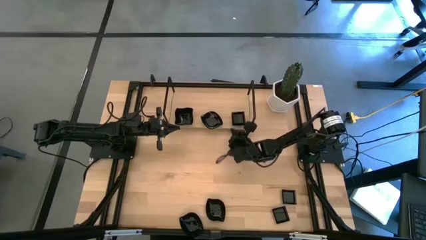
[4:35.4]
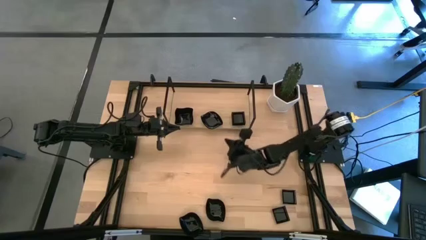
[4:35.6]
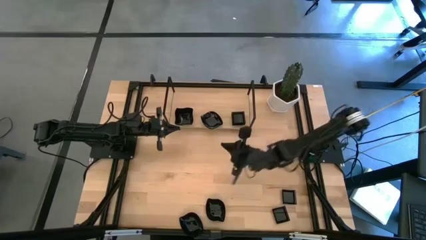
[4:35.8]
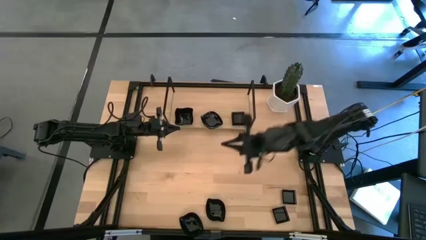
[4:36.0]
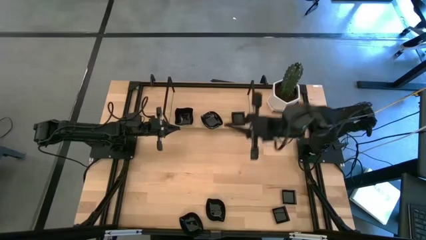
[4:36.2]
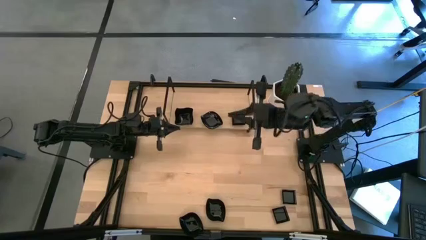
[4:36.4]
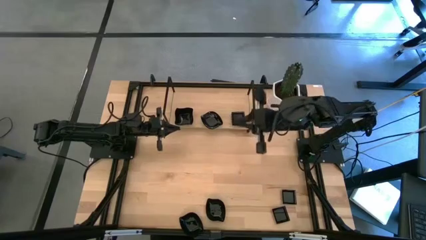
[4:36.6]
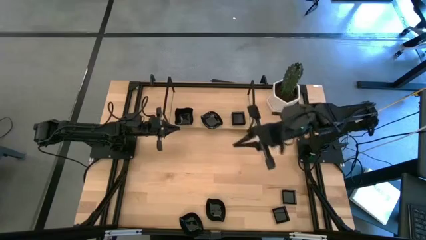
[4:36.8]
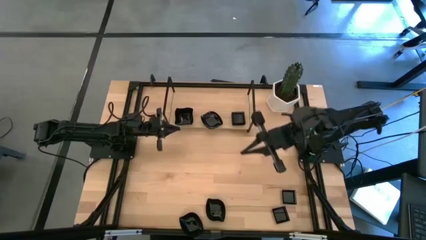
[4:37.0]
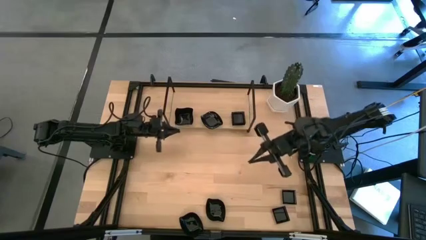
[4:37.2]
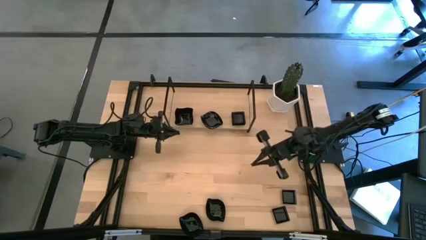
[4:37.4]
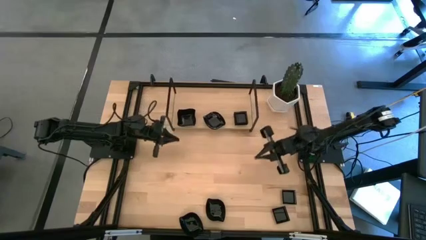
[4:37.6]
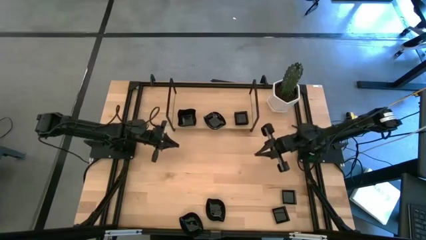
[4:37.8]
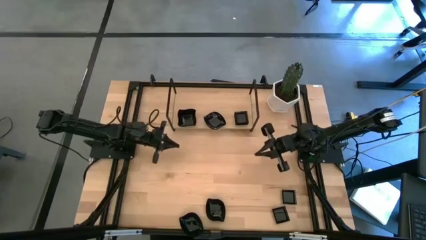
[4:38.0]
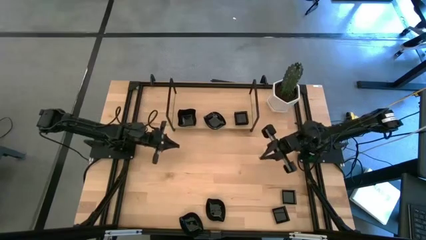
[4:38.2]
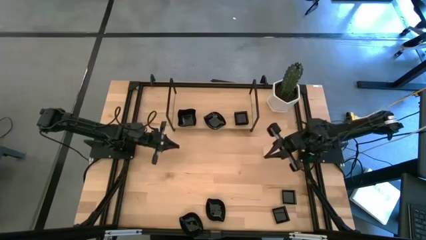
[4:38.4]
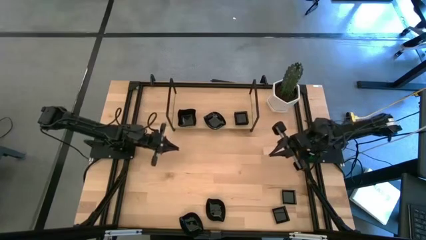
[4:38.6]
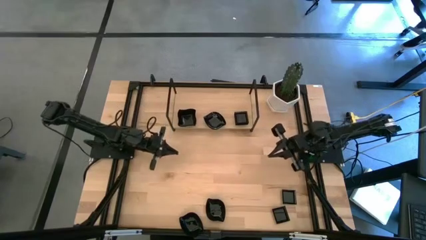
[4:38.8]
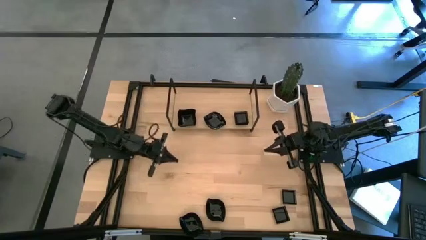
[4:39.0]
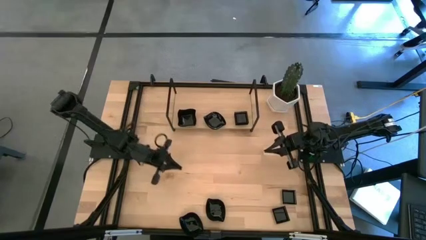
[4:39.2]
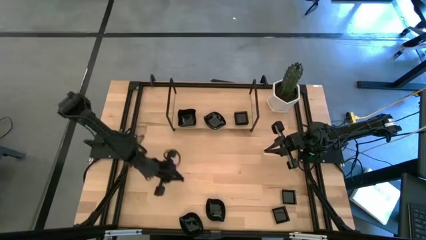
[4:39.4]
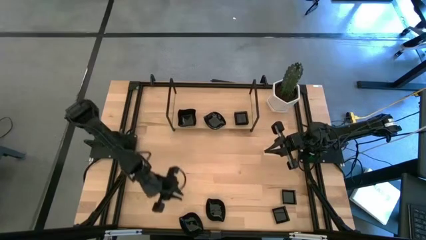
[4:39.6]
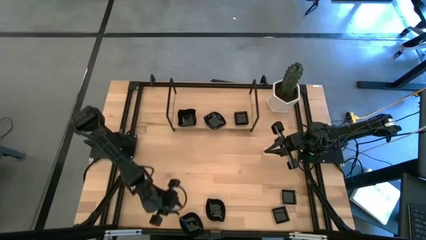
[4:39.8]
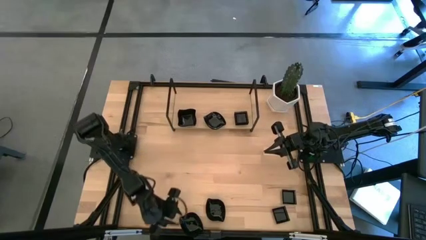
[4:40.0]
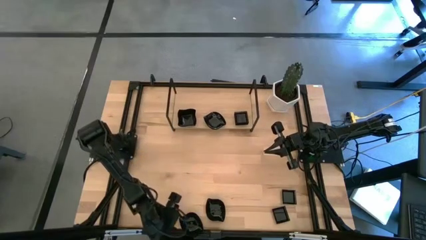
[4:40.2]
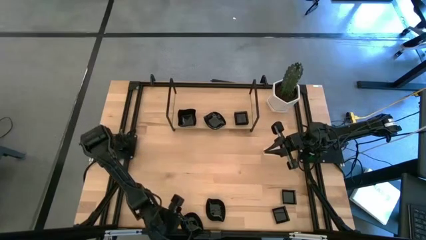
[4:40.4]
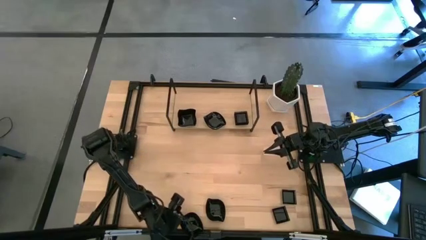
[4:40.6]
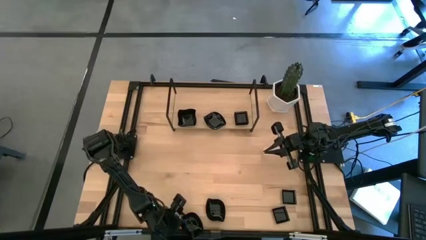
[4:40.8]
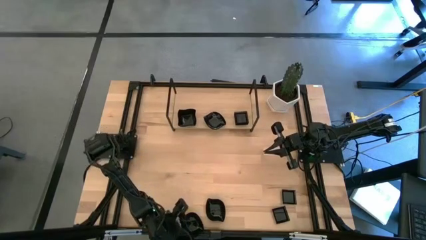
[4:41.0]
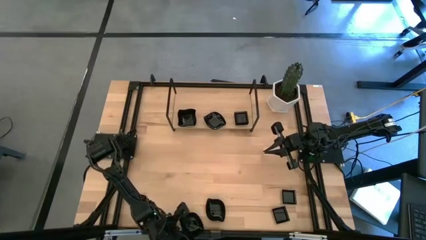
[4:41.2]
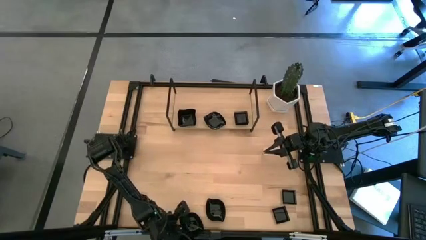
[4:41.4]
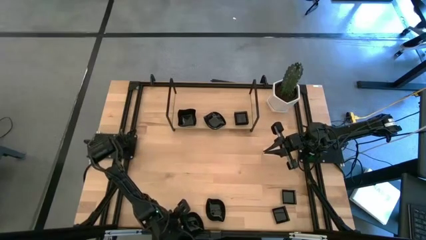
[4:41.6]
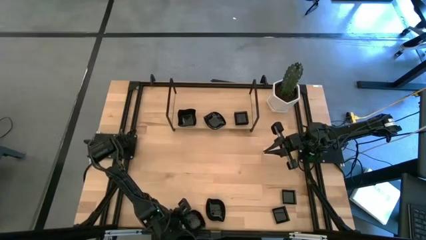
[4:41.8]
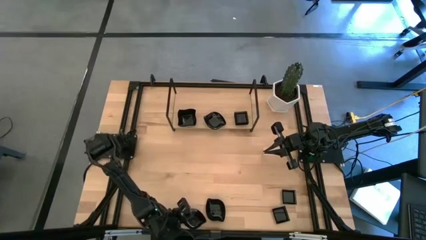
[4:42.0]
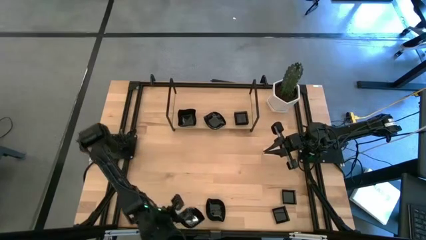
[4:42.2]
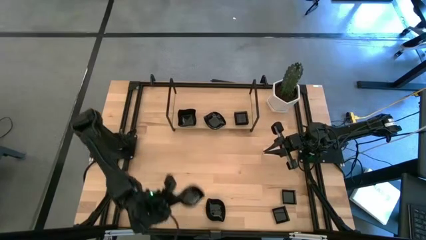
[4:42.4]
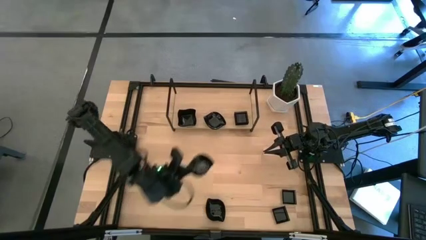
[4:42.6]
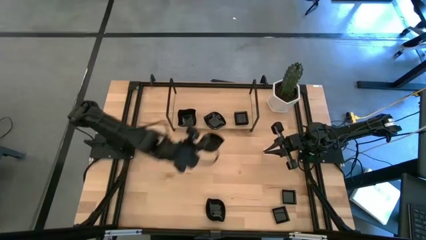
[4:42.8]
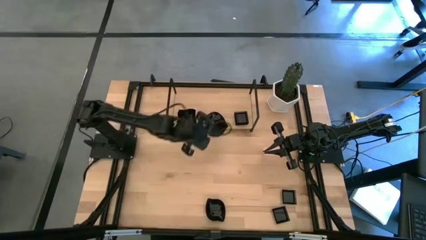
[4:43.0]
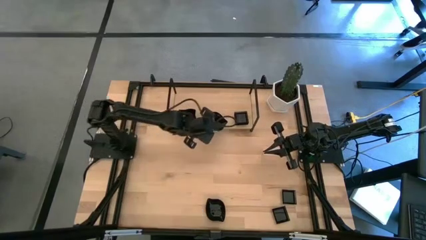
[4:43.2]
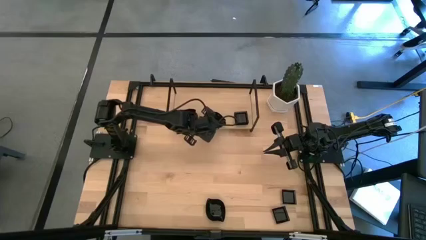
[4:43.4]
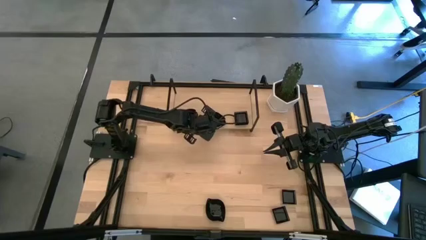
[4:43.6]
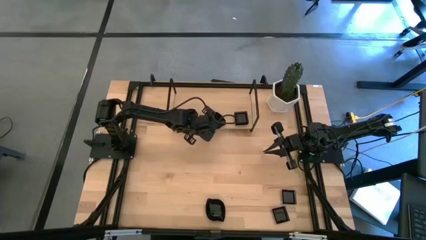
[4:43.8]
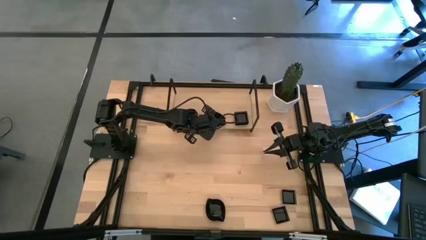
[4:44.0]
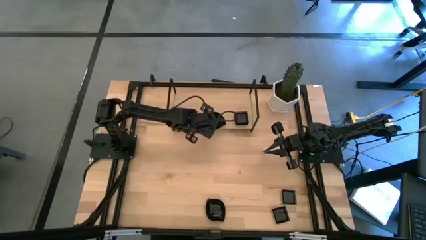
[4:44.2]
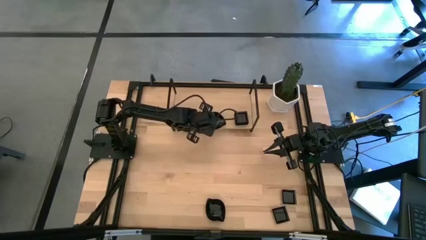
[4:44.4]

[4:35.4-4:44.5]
Task: Pick & Place Mini shaped plates
Stack the black leaf-shaped plate on top of the black leaf-shaped plate on the shelf

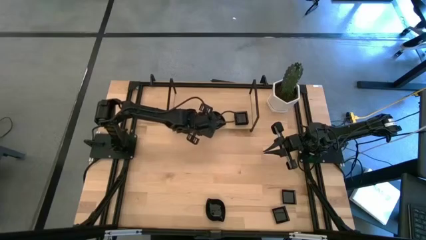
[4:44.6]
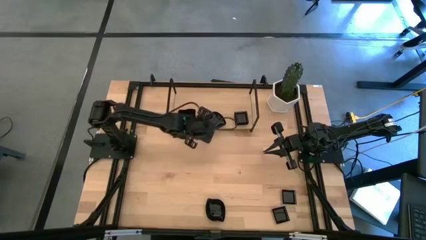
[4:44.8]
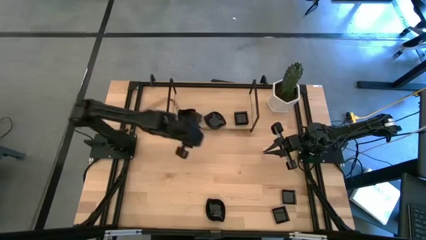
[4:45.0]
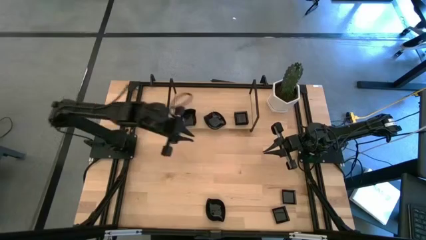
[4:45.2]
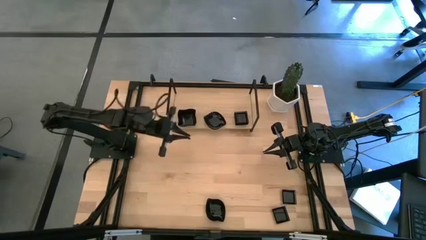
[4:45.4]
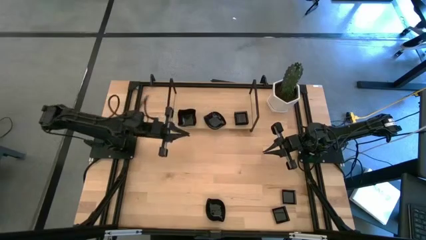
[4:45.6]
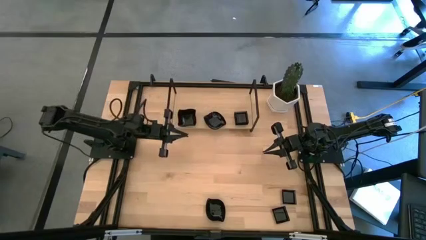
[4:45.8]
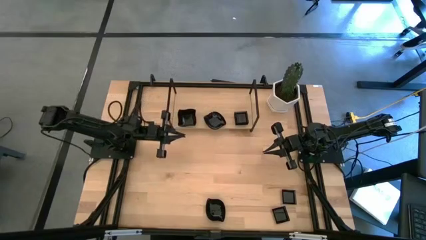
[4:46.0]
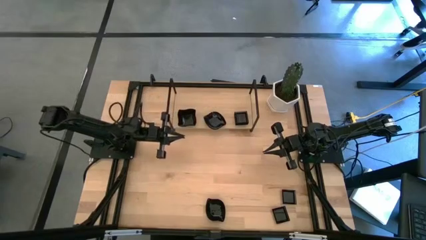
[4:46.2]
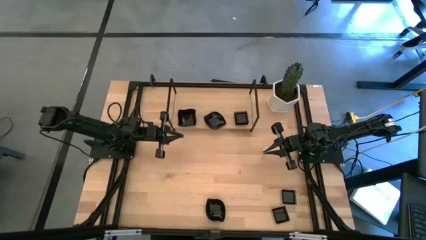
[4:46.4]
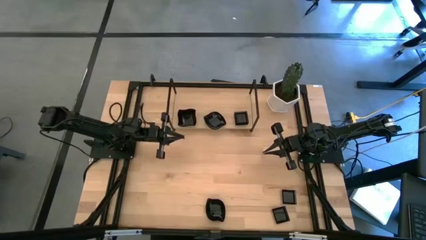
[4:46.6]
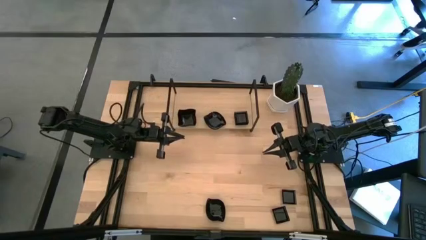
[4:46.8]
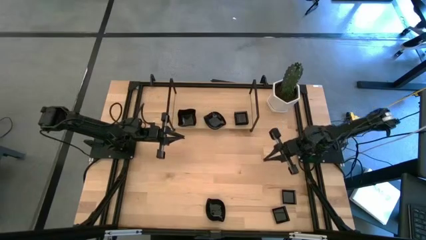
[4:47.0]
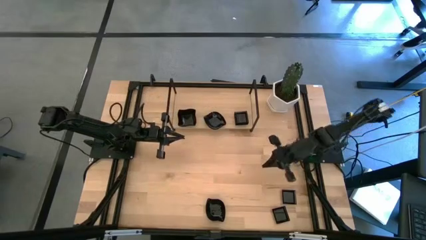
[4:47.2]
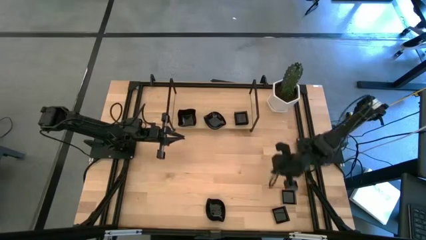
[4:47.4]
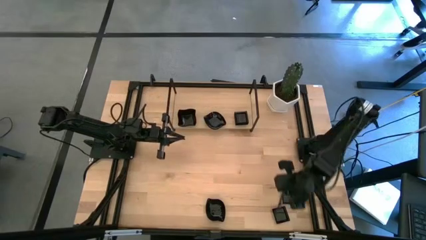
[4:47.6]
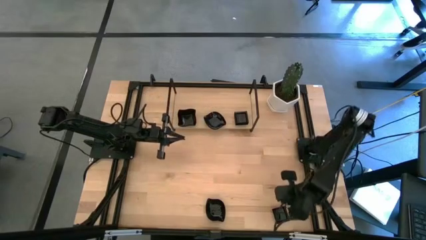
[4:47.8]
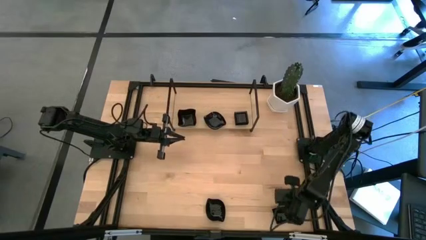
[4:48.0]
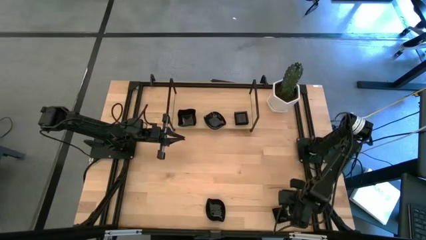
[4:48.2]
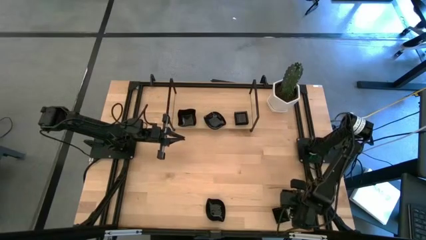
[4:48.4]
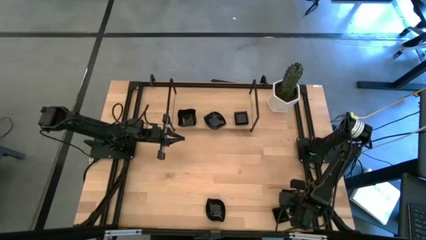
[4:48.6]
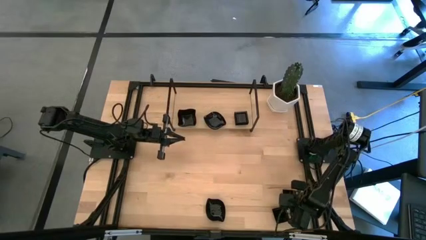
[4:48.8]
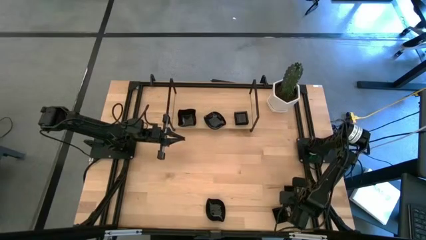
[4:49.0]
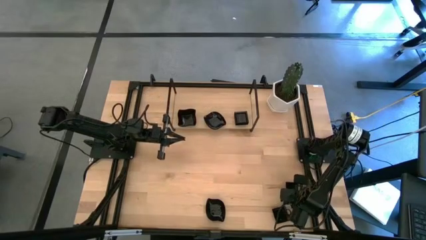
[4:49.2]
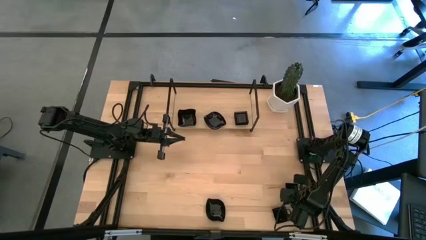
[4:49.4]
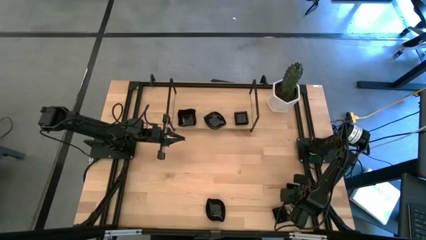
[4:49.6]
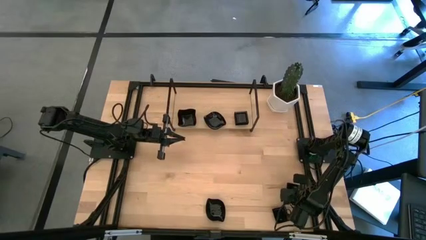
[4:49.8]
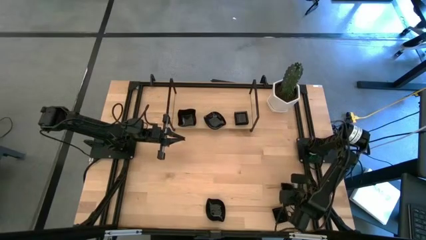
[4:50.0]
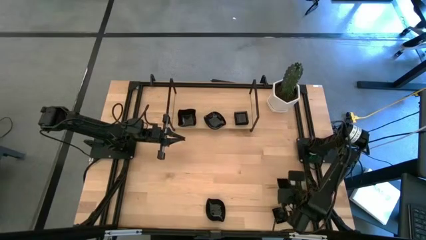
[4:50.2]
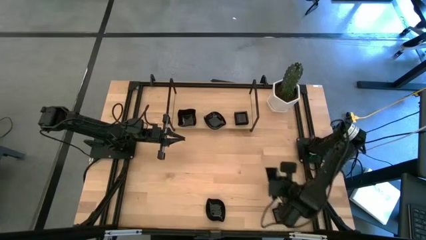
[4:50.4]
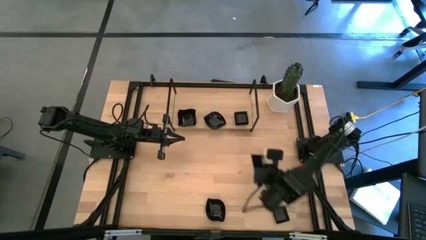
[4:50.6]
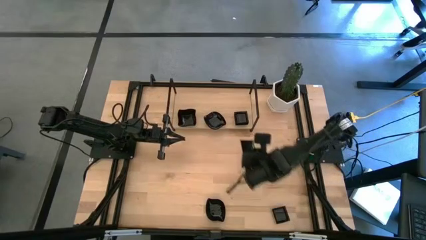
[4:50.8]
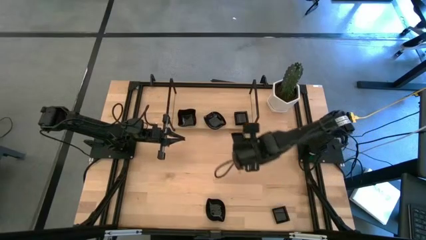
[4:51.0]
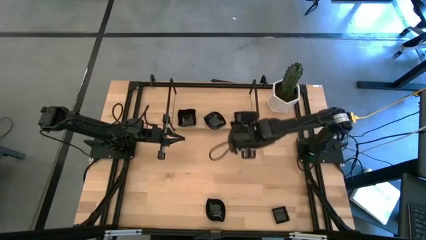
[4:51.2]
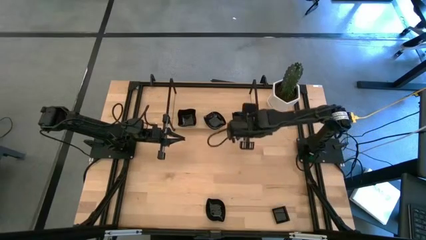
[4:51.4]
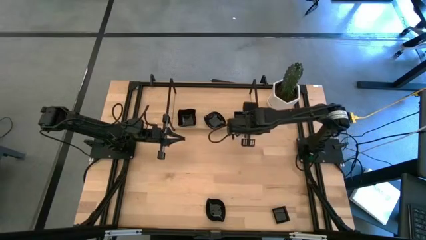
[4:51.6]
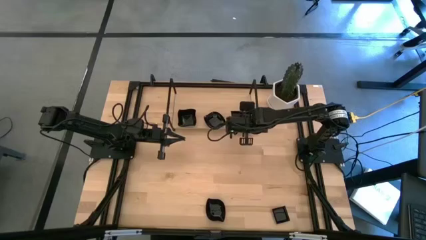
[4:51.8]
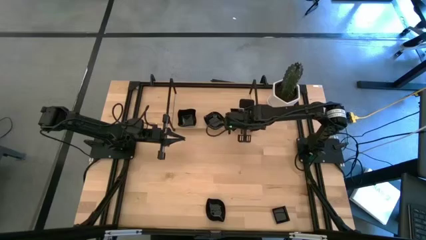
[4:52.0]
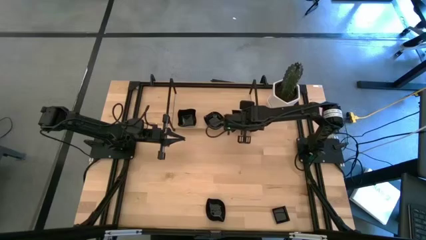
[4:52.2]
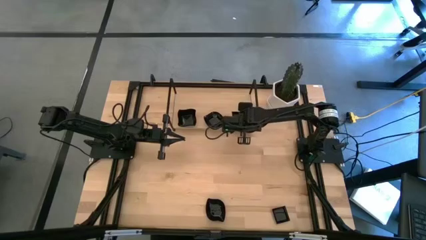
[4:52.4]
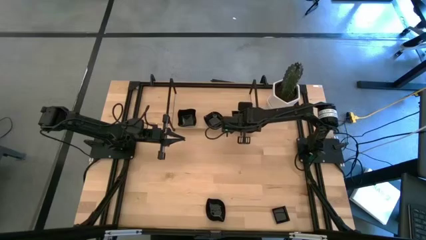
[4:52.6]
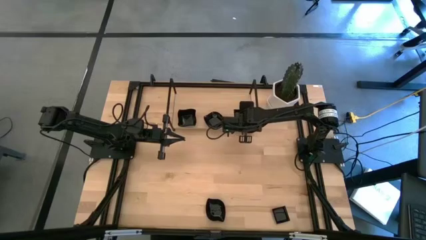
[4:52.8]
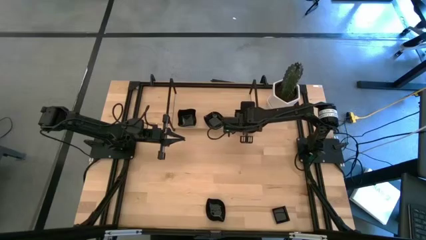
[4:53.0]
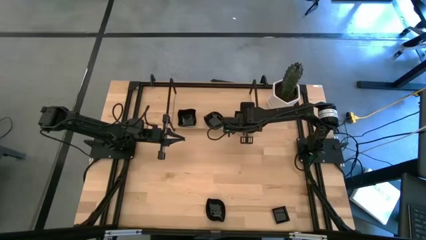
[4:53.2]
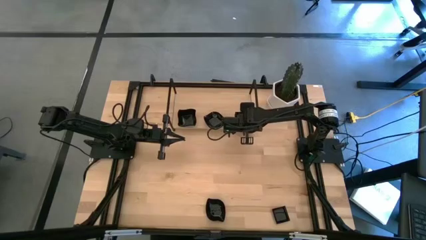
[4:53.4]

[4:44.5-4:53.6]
Stack the black square plate on top of the black square plate on the shelf
